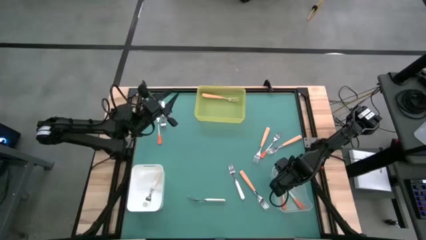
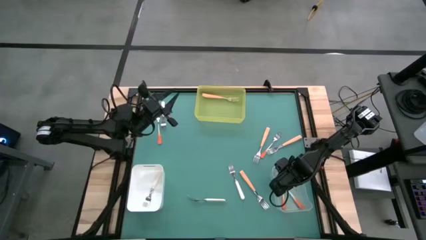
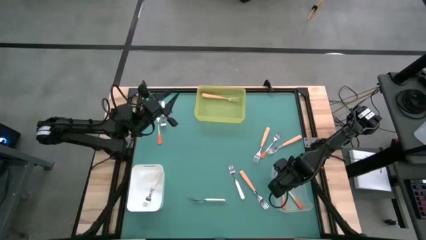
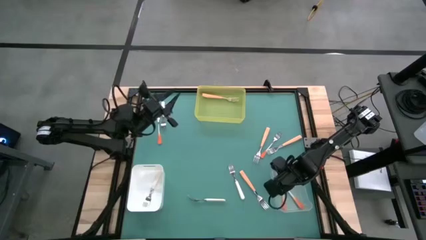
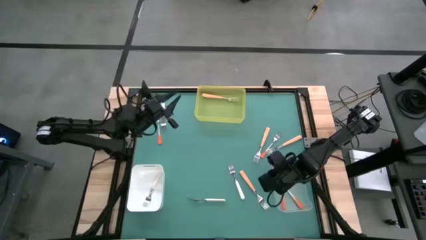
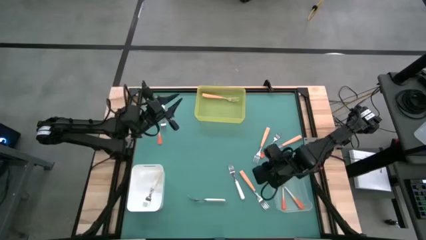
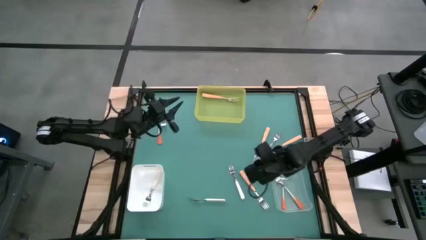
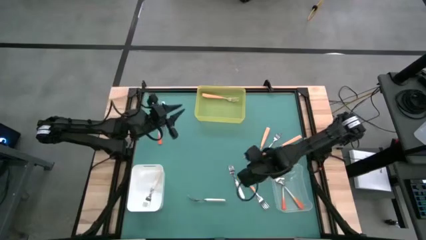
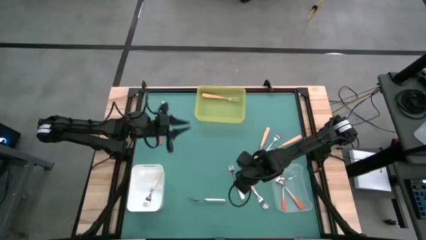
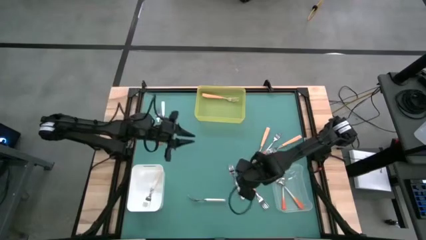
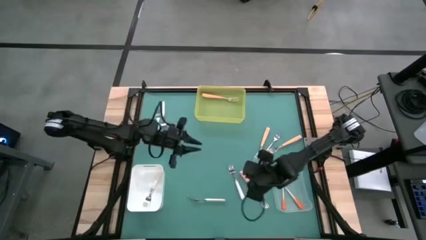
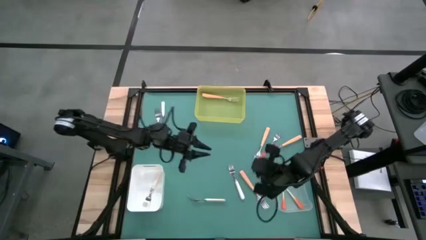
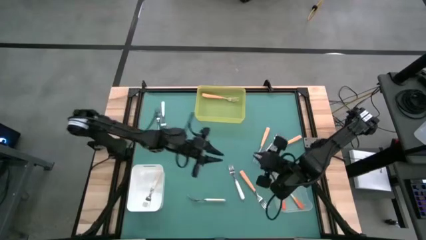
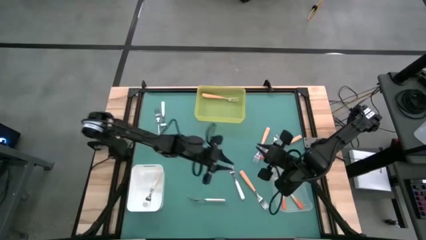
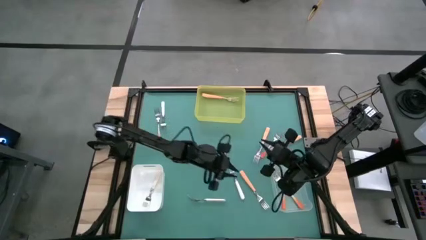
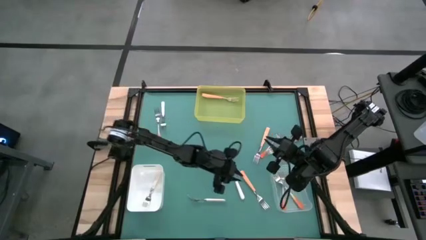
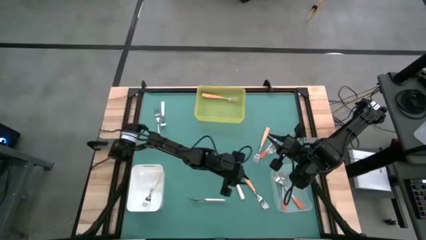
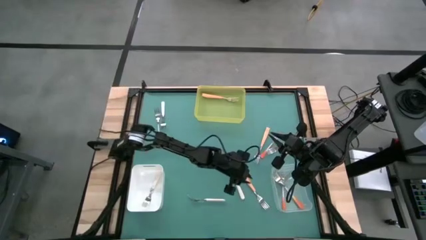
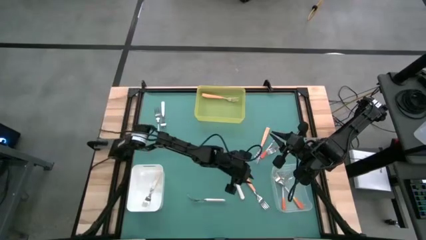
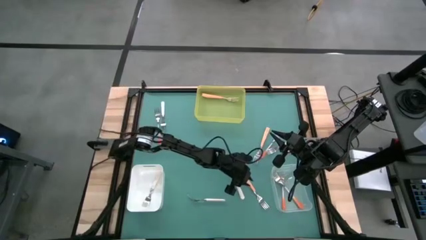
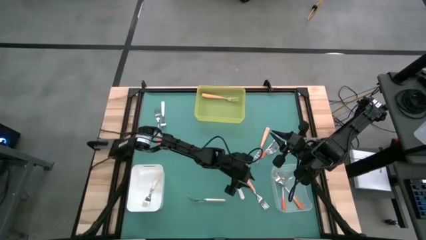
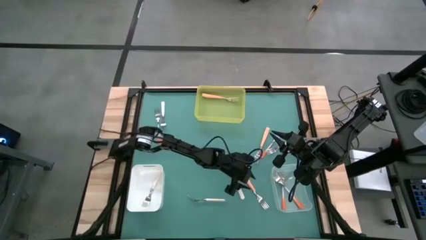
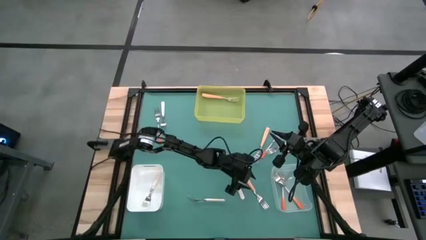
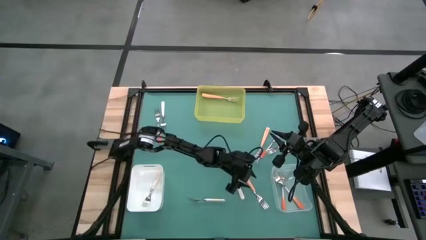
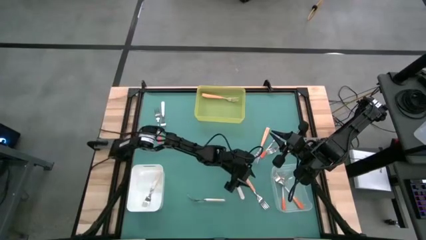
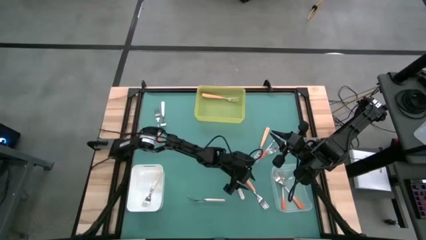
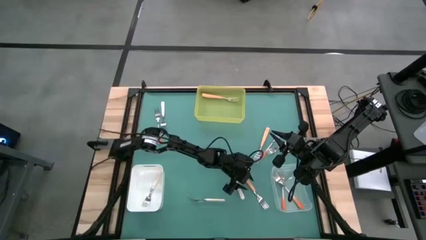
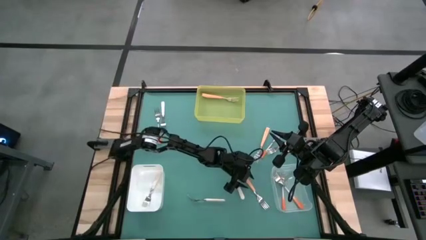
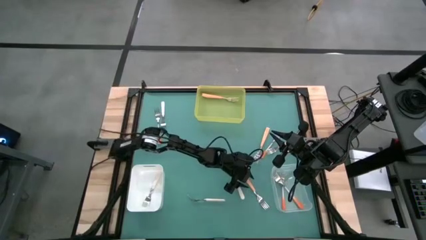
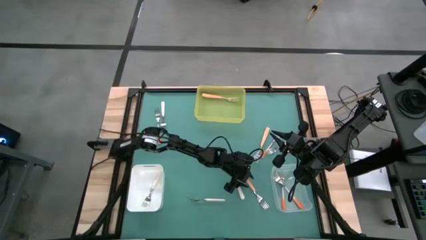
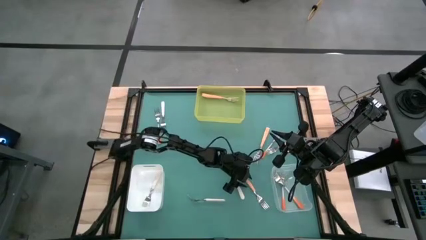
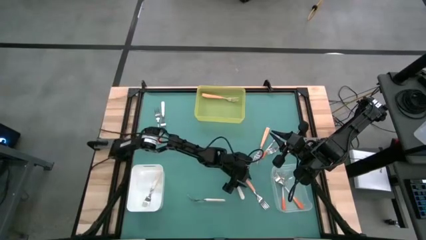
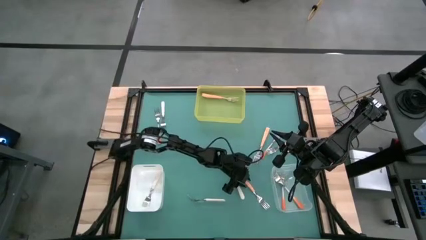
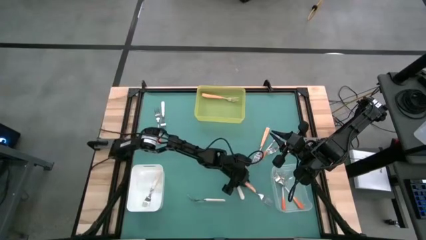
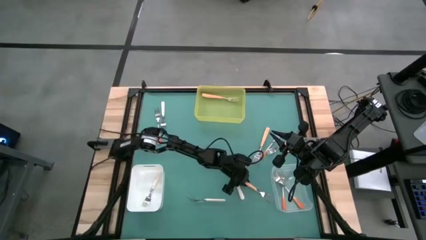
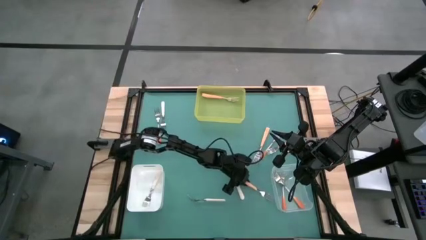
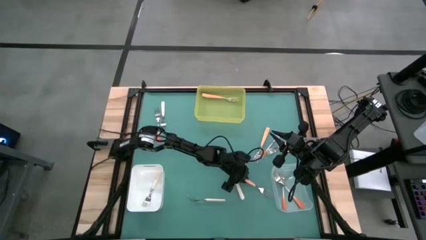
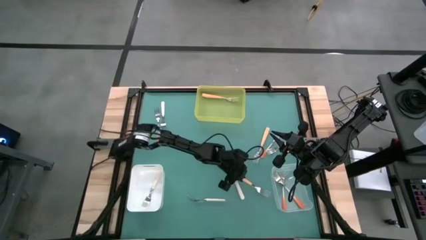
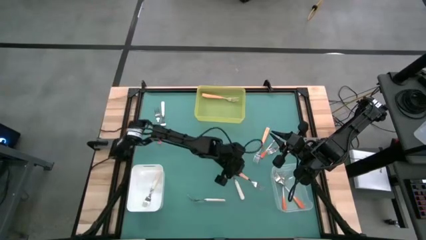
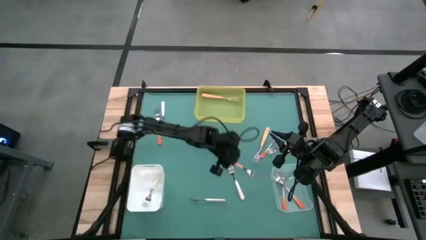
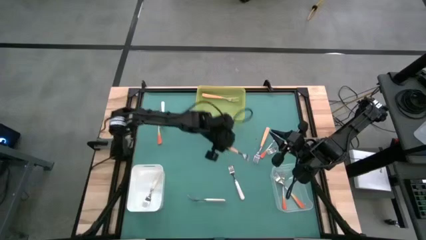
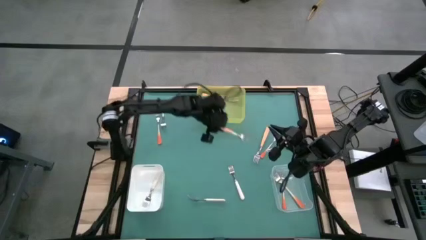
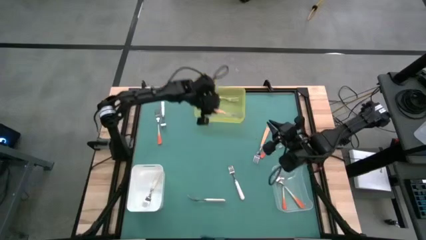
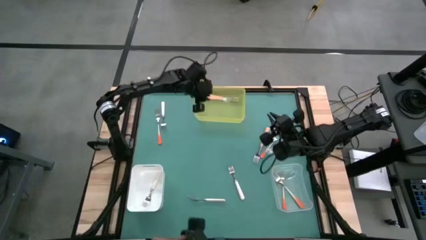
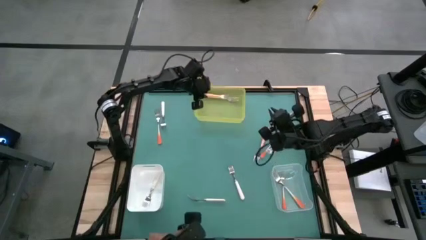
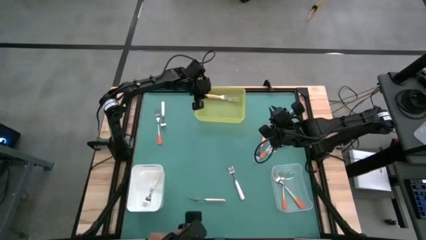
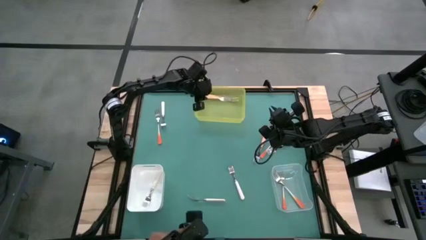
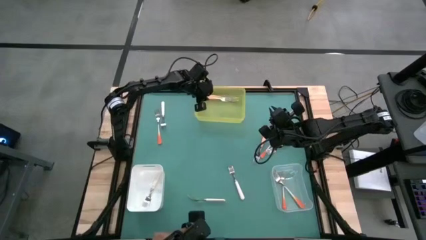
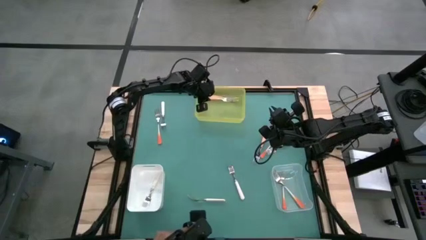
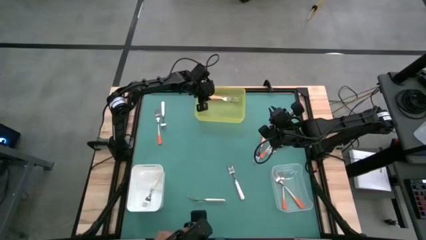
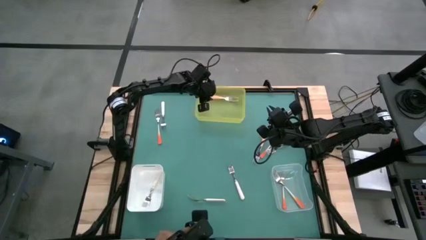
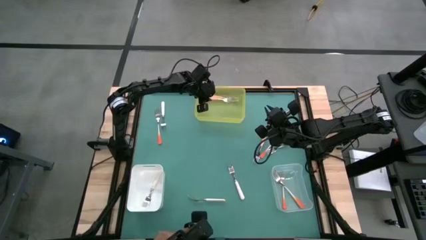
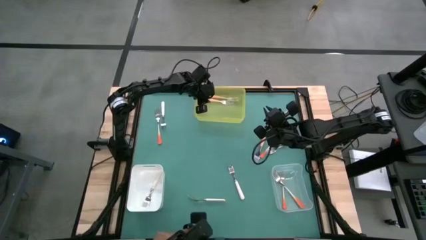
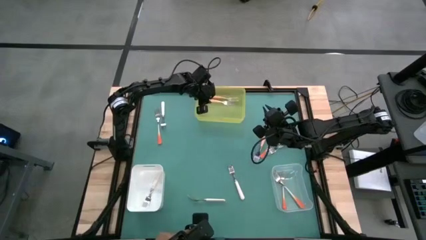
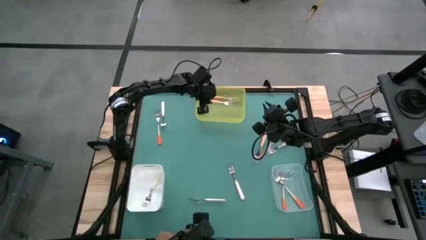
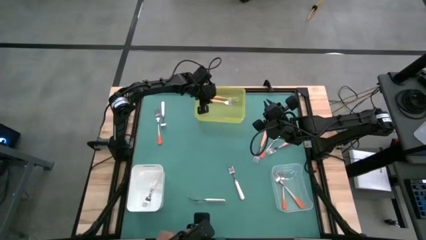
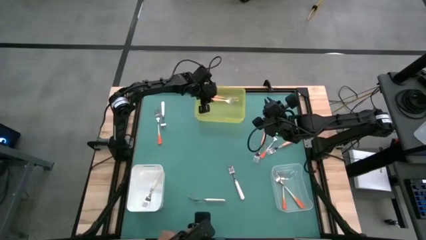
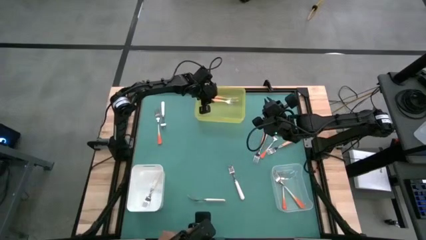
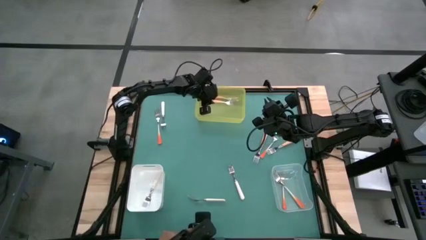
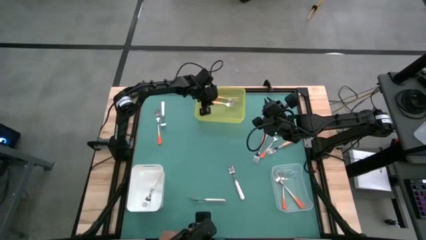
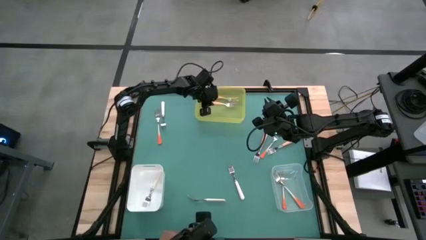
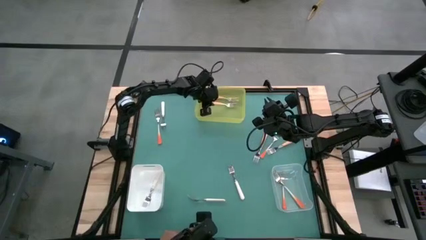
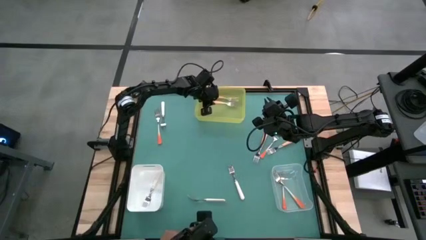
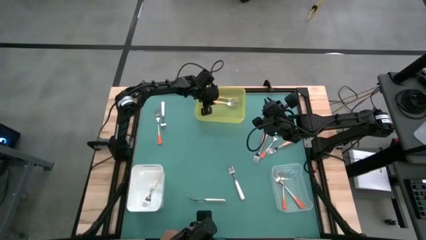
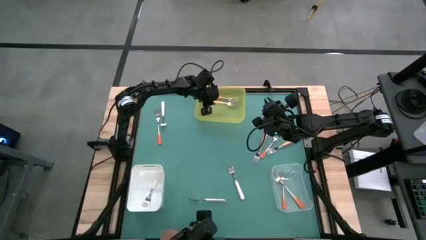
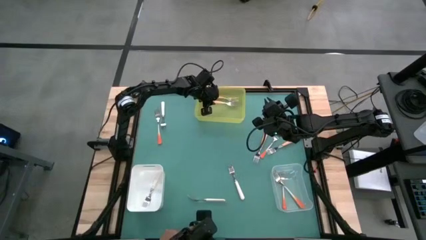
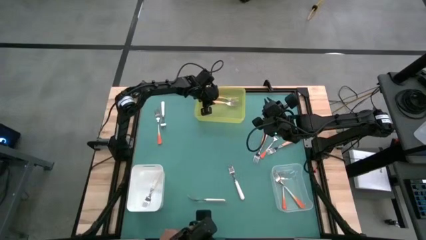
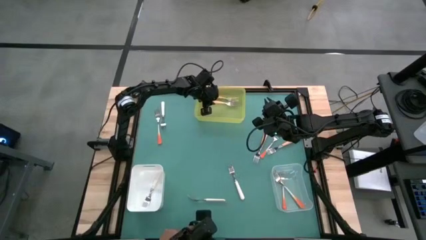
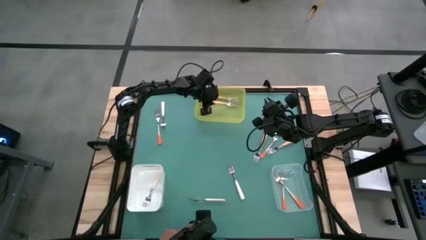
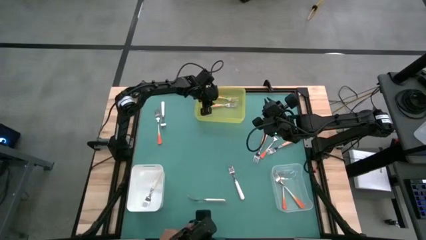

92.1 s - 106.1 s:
Task: Sort silverware by color (type)
Put the yellow fork into the yellow bin
